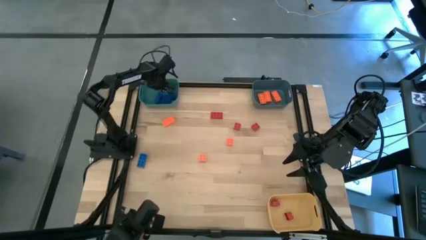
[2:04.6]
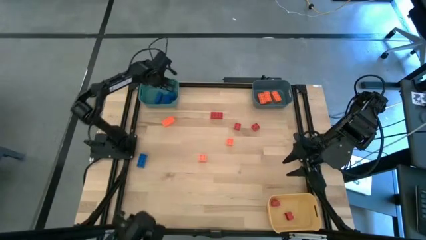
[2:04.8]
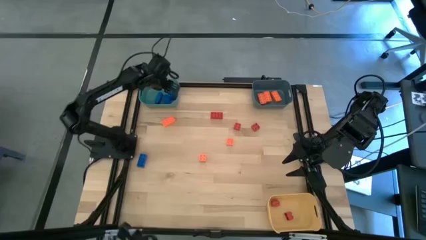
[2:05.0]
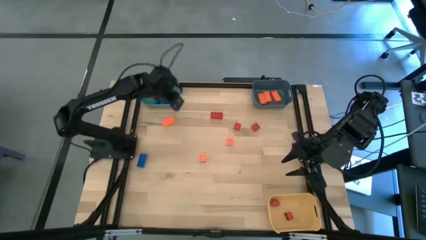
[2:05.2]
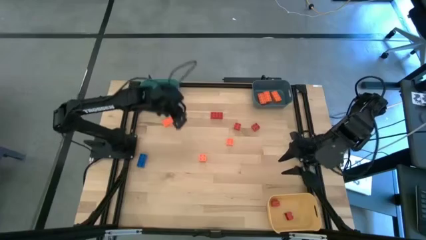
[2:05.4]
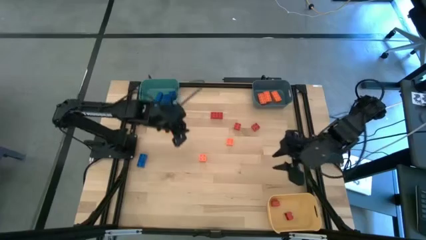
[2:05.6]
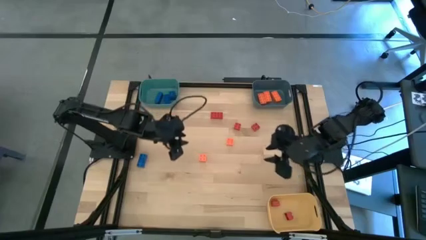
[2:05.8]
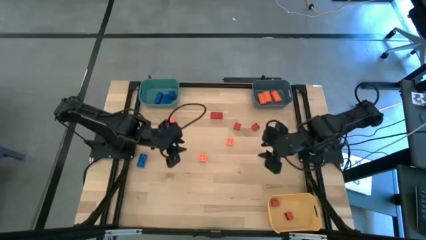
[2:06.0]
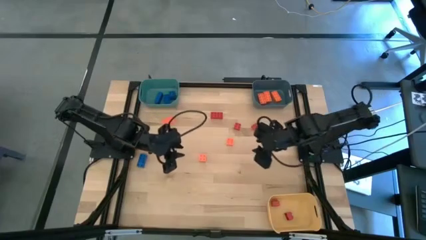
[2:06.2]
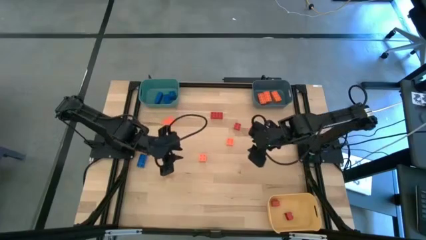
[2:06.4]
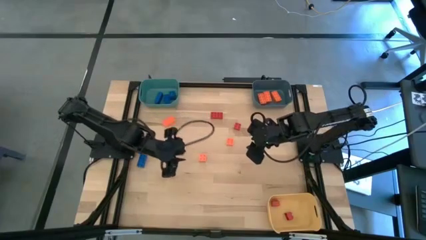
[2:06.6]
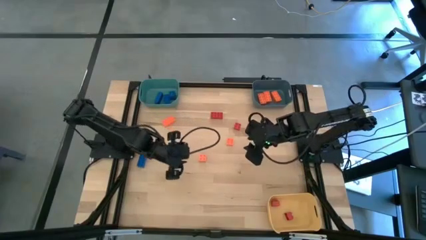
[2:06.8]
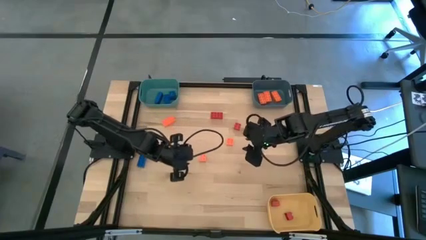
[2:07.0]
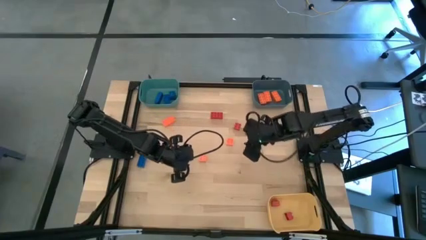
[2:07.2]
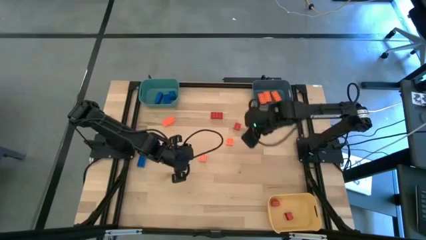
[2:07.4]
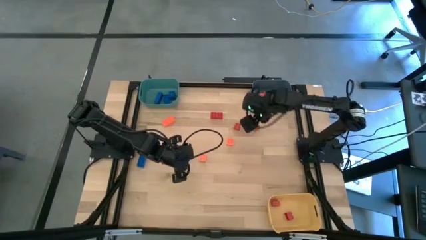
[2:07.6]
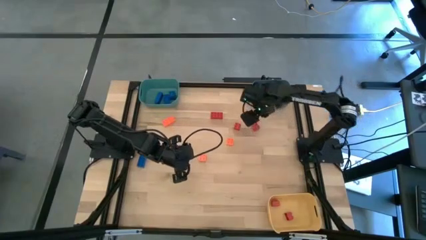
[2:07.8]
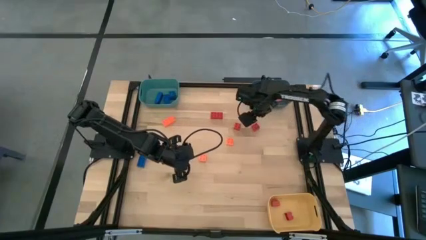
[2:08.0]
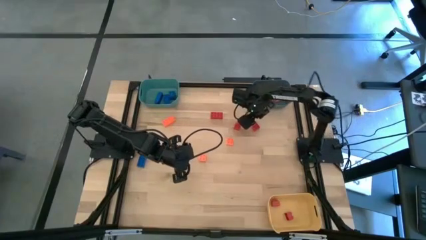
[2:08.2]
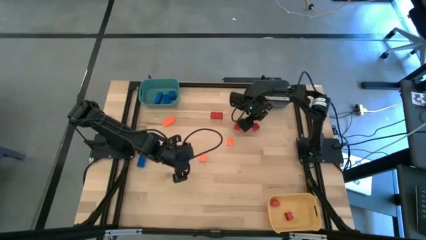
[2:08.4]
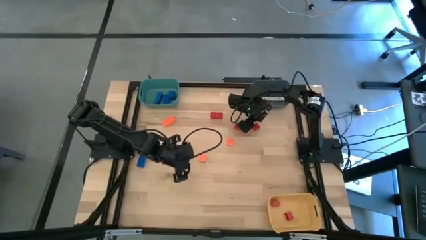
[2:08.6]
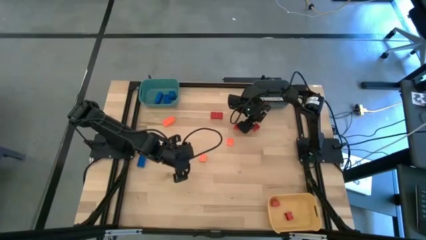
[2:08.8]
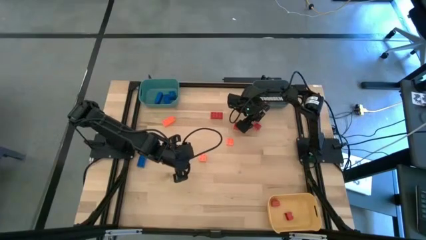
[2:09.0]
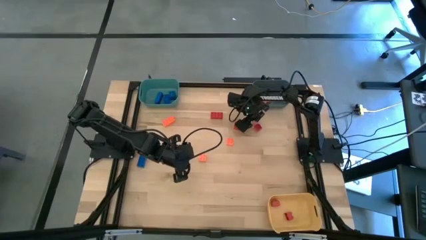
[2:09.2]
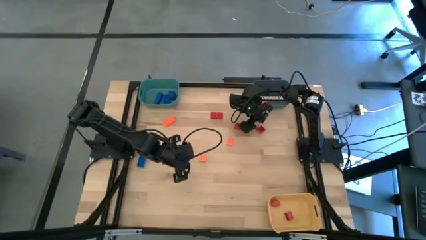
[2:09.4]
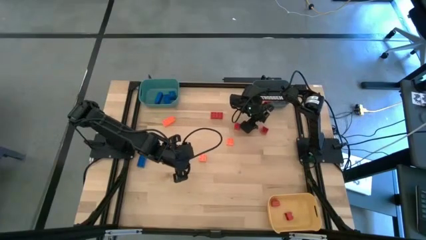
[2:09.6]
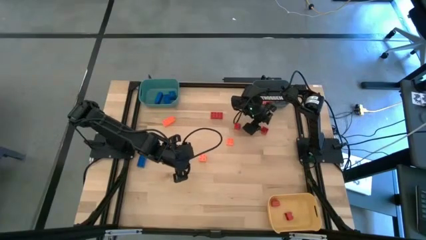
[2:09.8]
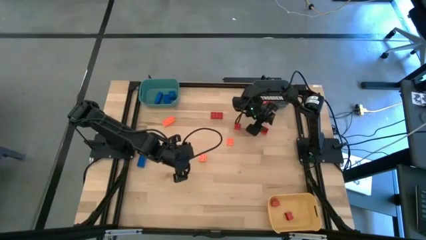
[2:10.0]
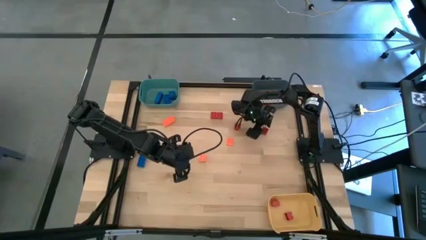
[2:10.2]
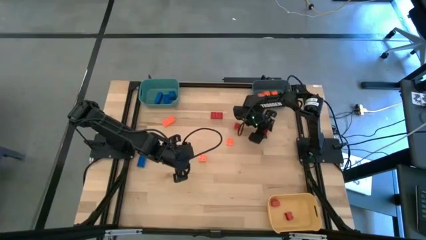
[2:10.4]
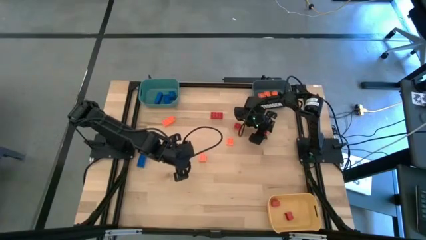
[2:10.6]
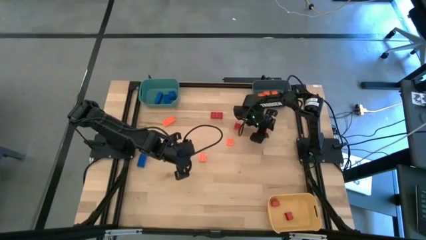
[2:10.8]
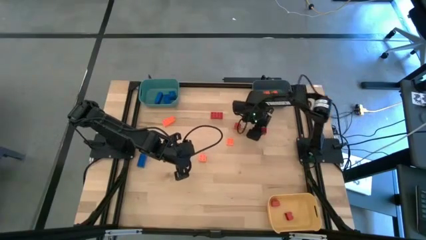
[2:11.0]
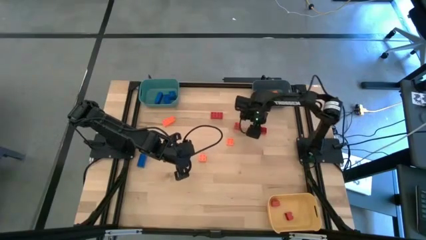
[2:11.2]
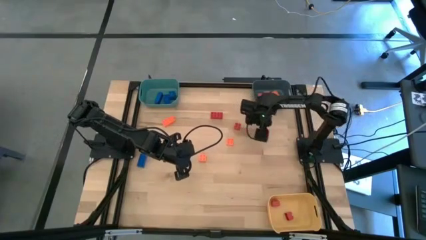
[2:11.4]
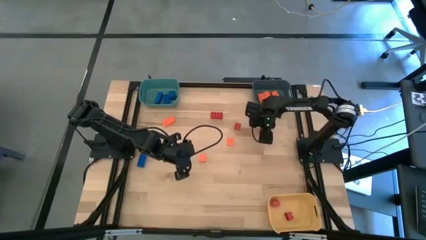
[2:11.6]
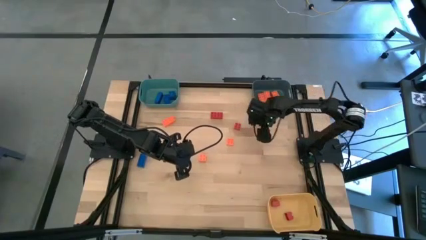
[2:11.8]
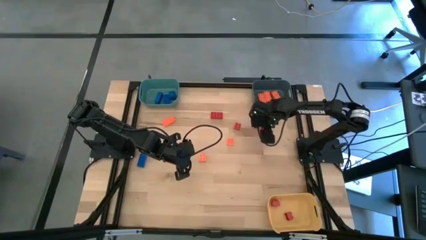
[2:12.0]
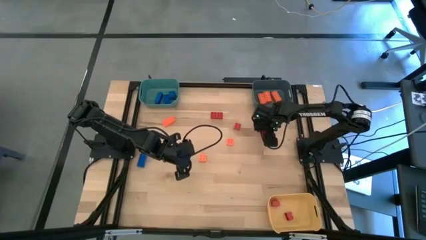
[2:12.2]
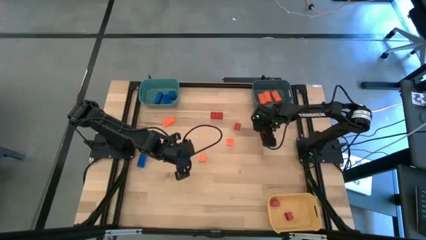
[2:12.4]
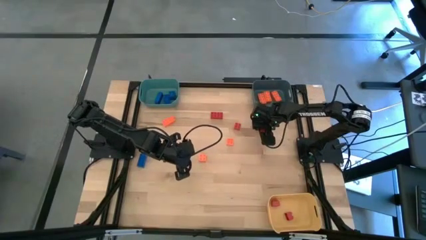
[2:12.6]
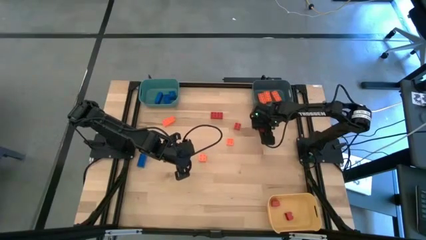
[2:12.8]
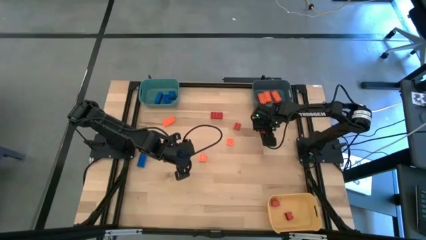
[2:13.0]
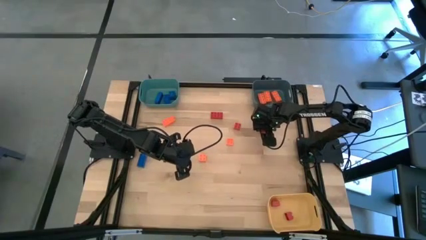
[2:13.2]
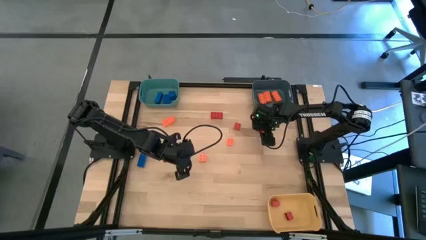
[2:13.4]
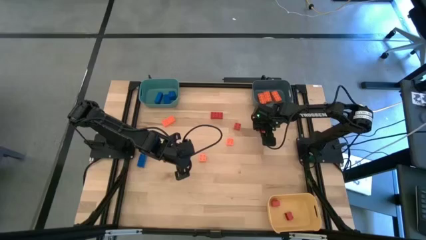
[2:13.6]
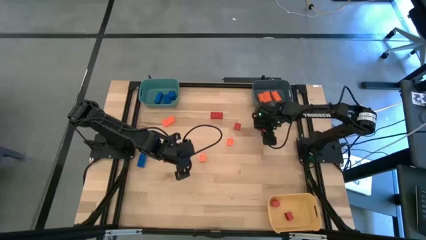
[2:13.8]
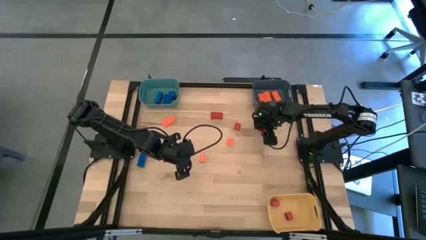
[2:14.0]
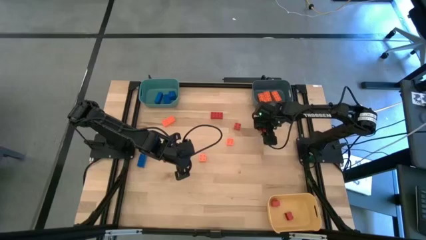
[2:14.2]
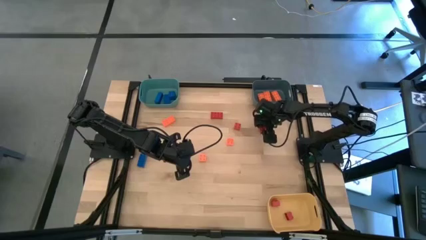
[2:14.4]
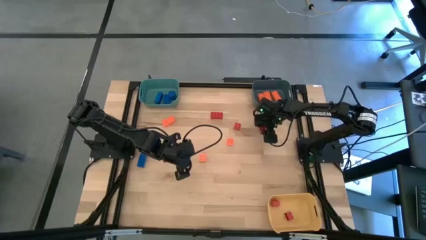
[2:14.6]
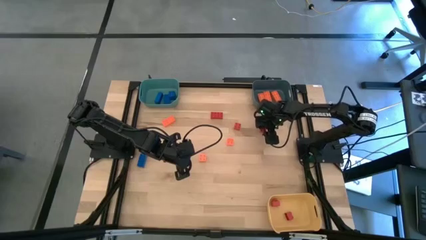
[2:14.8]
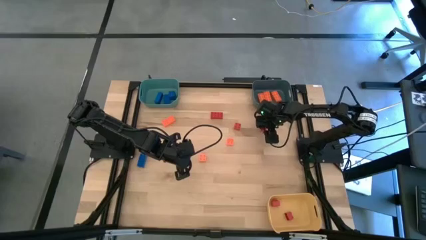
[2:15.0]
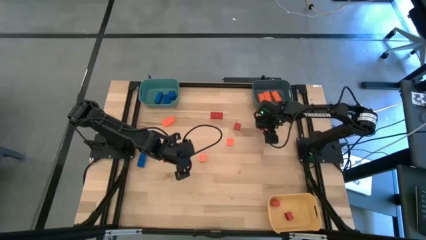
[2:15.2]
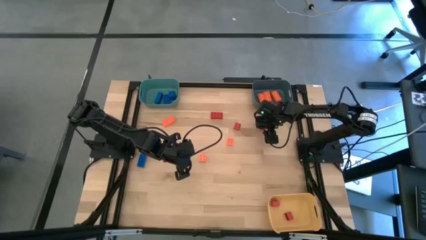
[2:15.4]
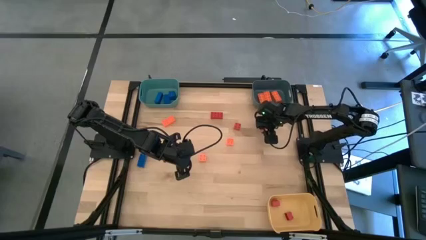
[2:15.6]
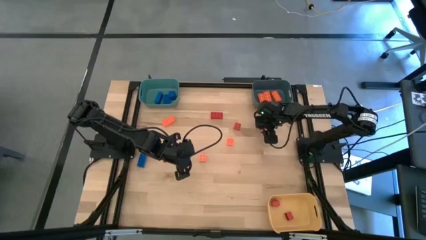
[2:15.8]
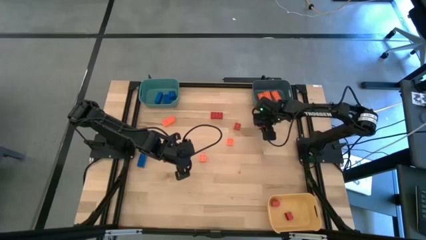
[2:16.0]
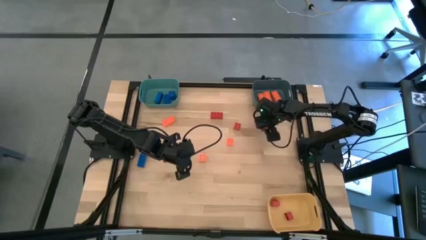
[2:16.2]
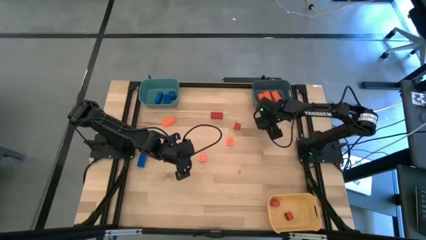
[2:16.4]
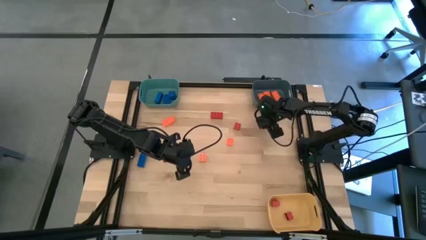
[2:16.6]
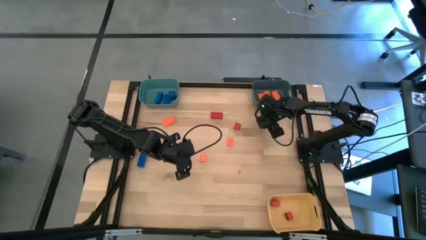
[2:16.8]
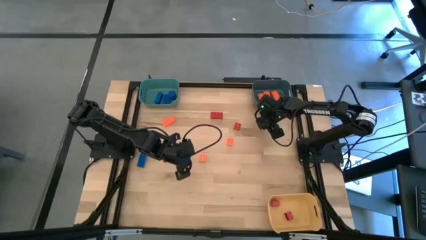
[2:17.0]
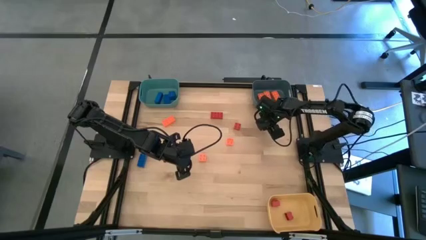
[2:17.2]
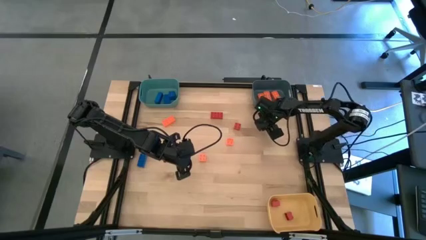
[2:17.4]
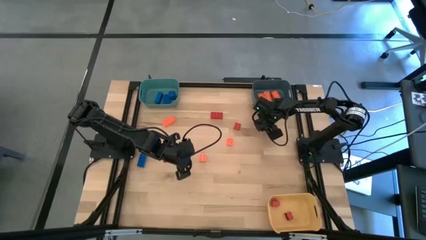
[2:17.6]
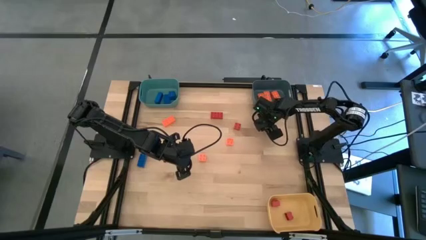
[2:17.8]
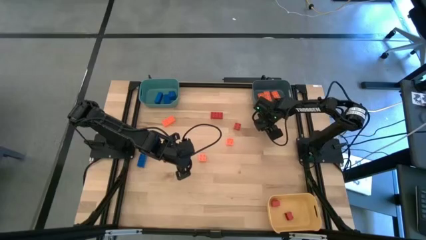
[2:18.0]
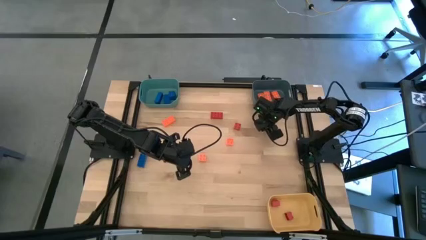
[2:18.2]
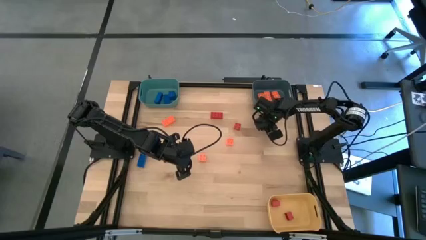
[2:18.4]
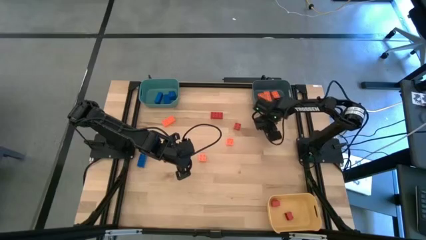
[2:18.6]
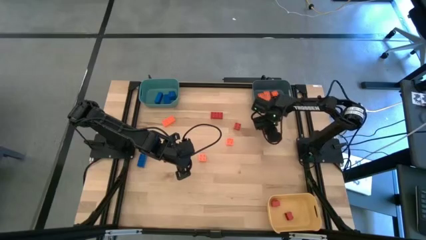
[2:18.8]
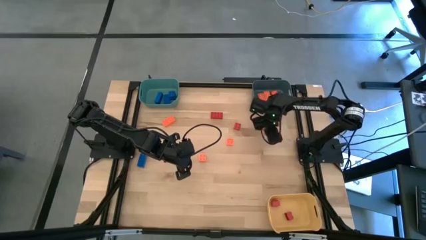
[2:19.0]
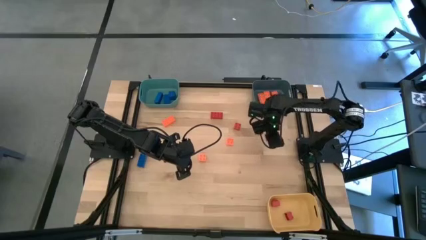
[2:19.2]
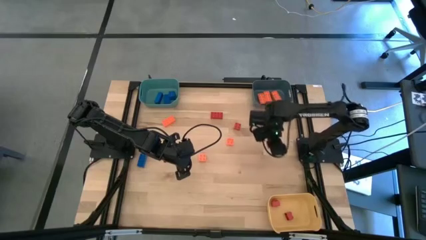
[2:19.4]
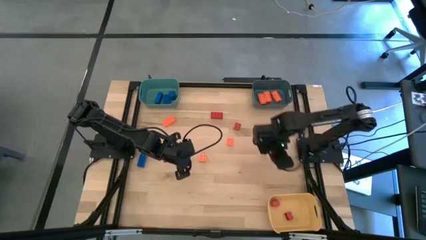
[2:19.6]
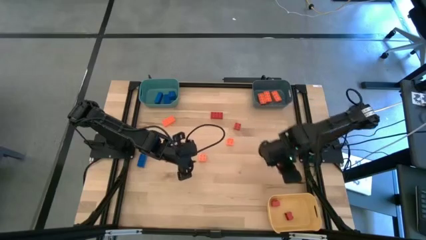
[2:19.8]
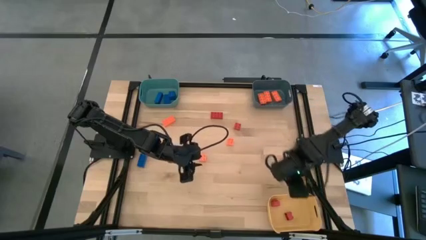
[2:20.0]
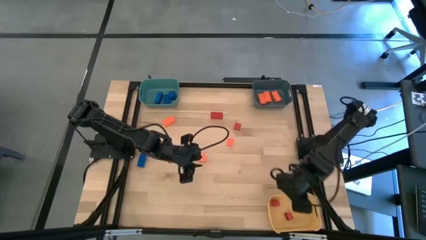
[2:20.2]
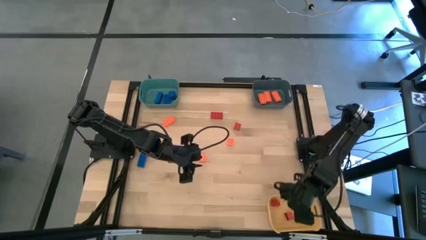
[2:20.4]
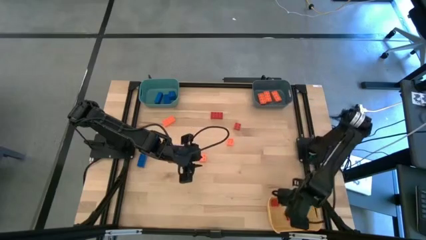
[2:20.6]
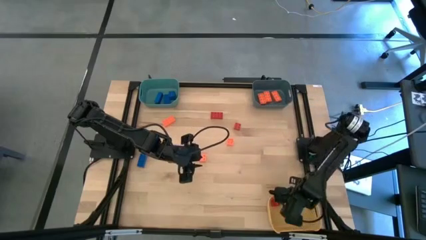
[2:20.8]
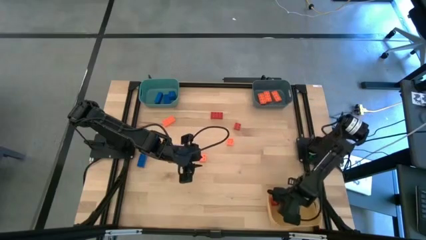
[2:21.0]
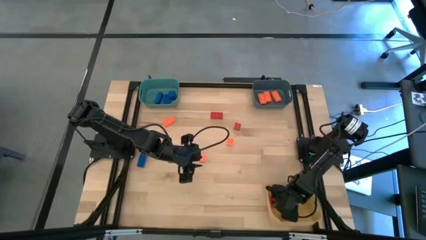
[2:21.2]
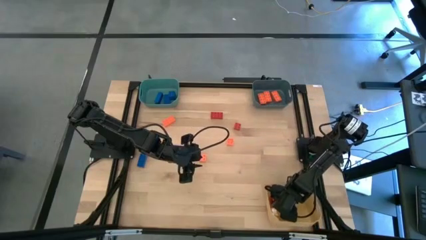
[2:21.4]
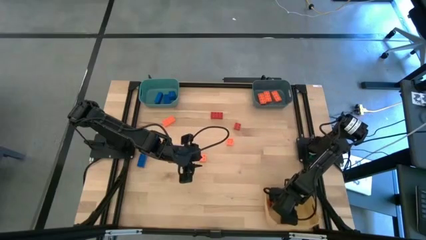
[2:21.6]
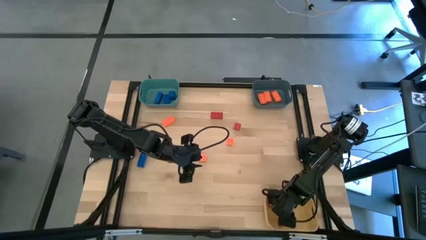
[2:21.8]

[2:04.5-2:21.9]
Task: Sort & place blocks by color
Put the red game piece into the yellow bin
